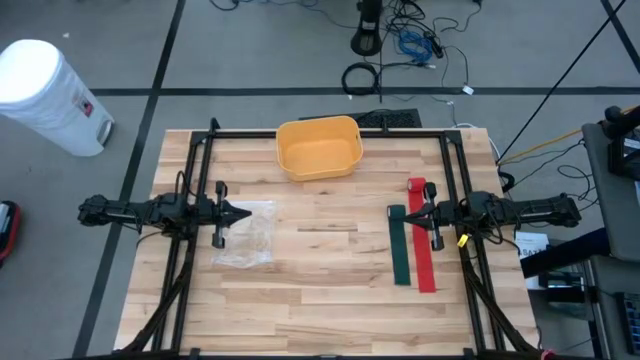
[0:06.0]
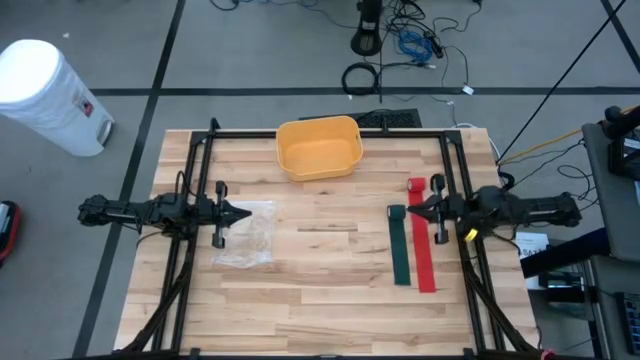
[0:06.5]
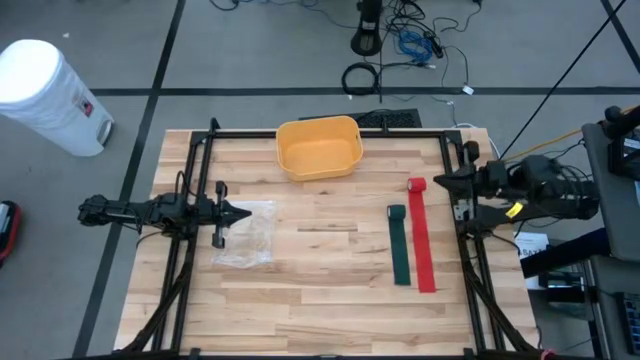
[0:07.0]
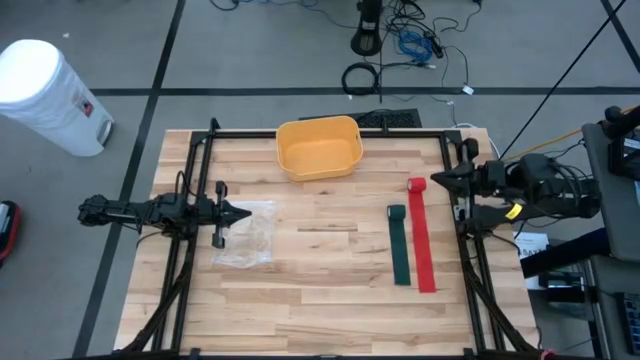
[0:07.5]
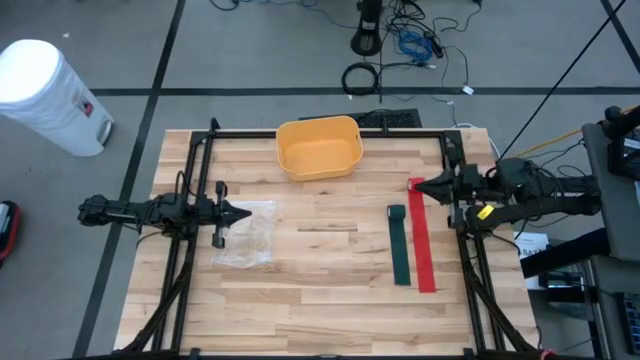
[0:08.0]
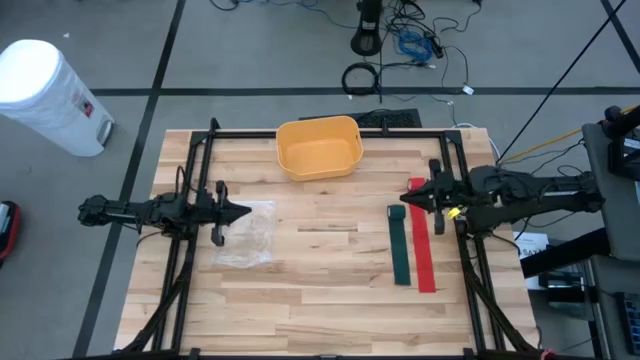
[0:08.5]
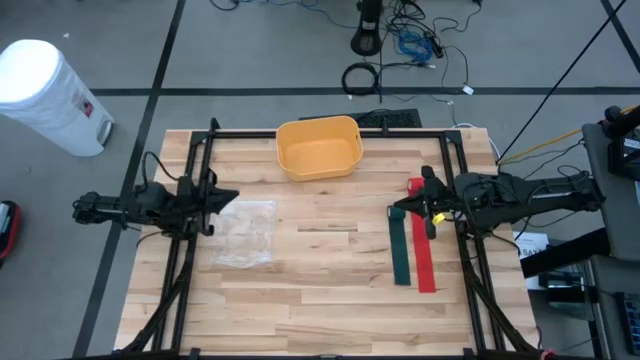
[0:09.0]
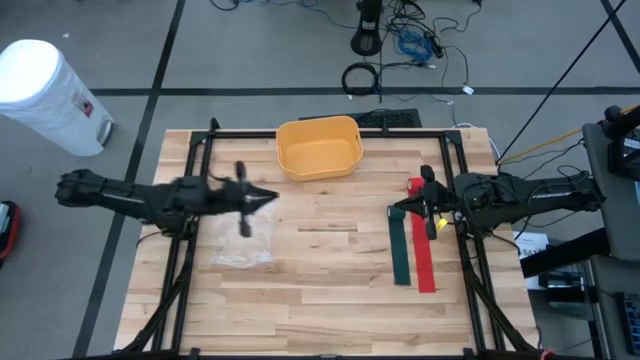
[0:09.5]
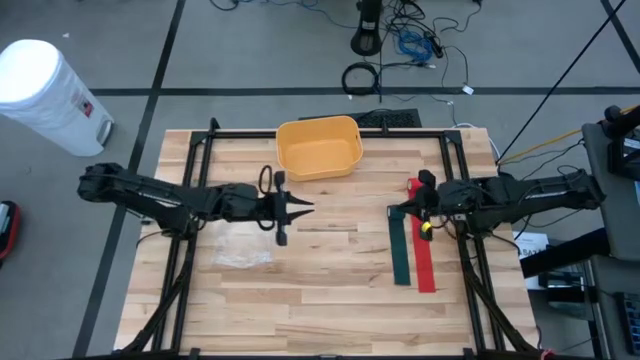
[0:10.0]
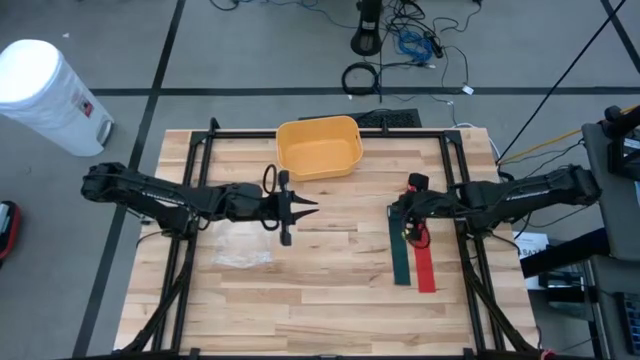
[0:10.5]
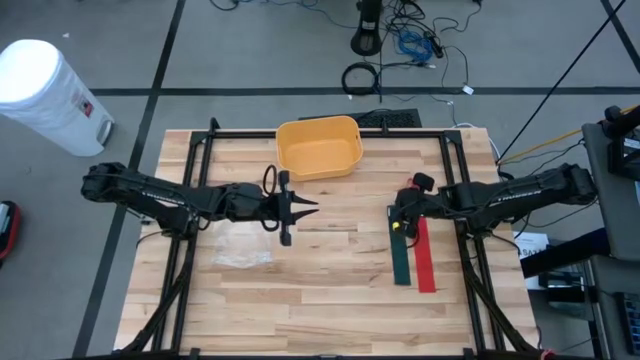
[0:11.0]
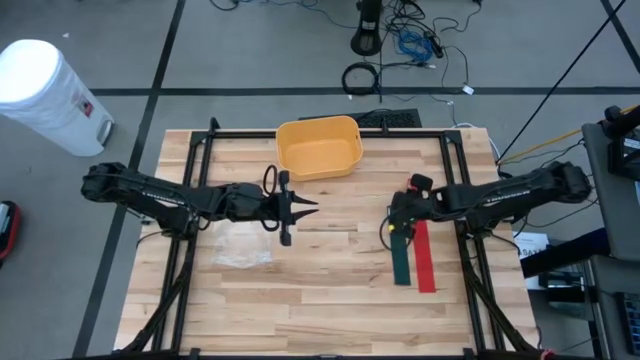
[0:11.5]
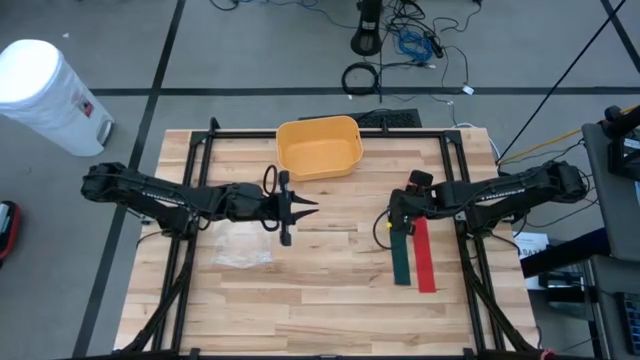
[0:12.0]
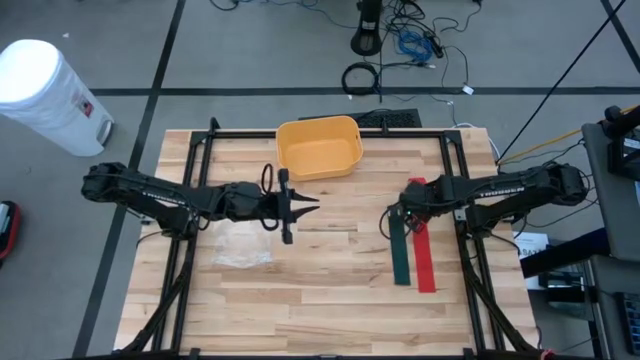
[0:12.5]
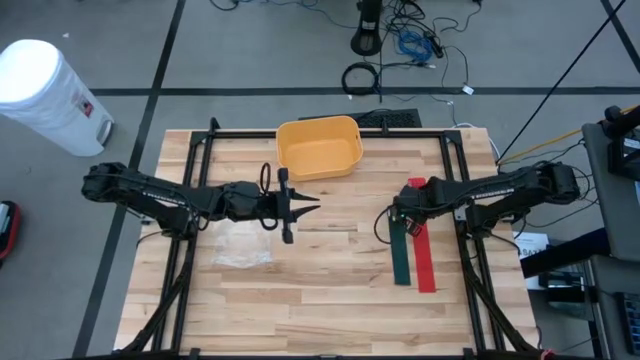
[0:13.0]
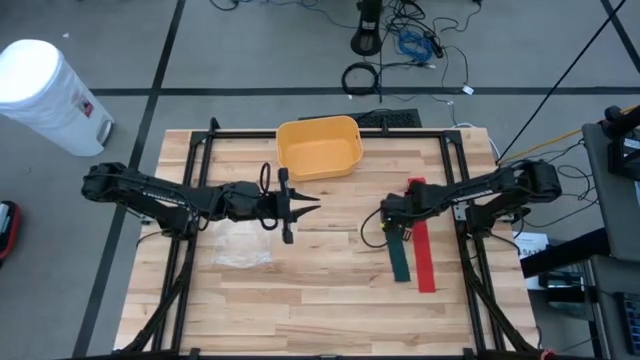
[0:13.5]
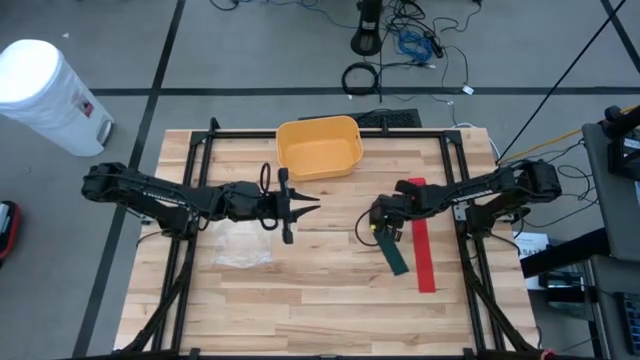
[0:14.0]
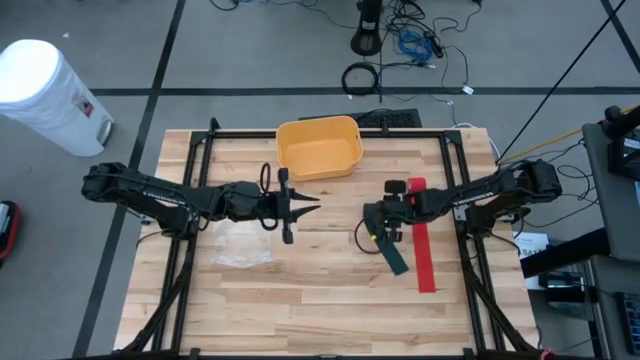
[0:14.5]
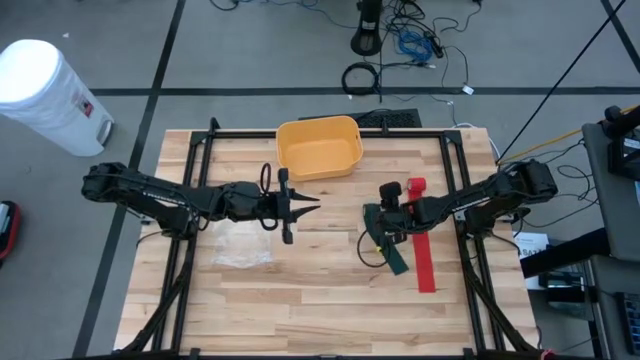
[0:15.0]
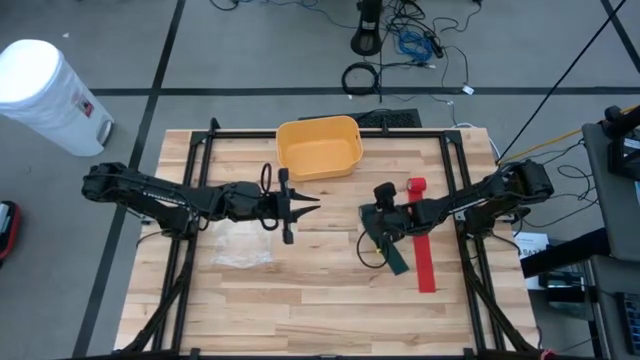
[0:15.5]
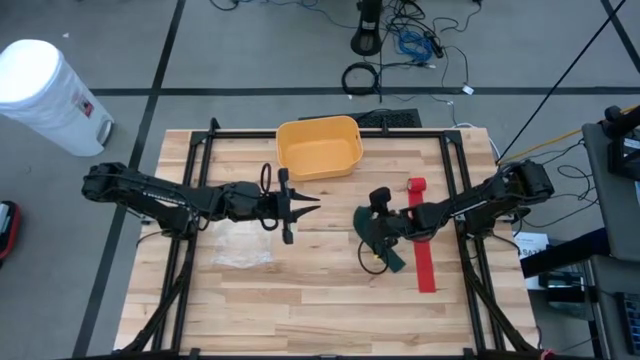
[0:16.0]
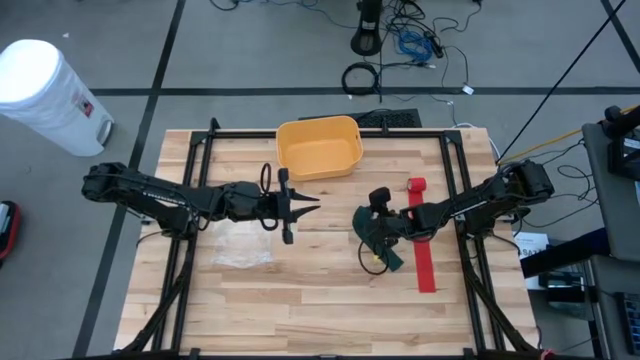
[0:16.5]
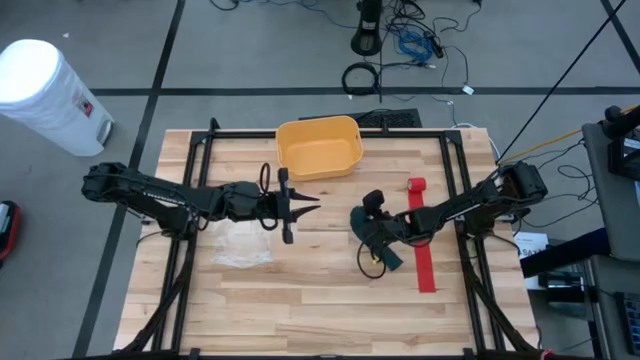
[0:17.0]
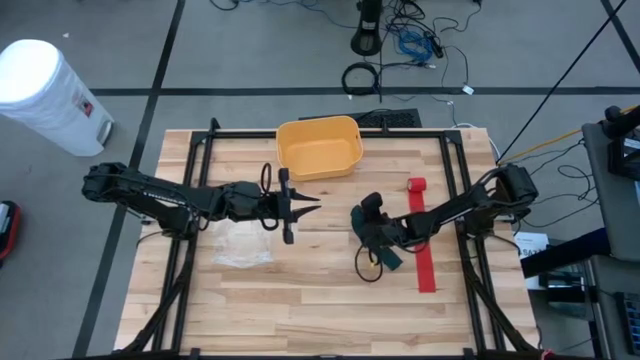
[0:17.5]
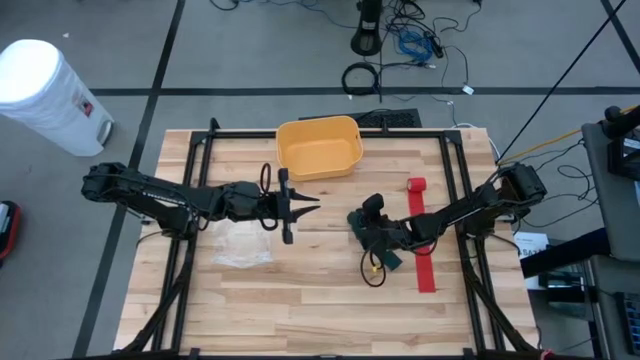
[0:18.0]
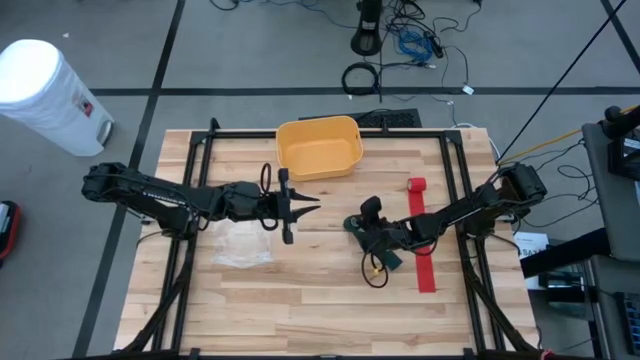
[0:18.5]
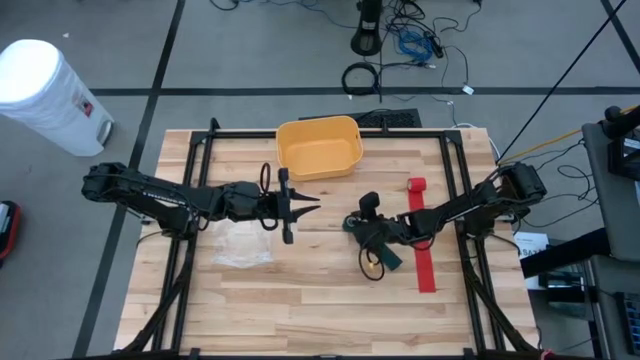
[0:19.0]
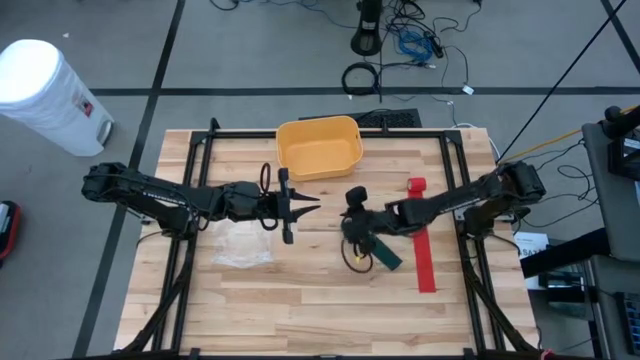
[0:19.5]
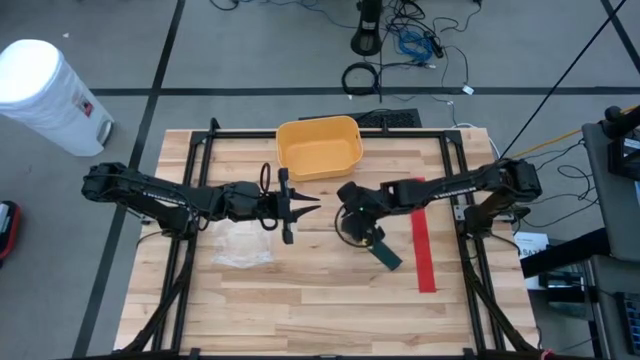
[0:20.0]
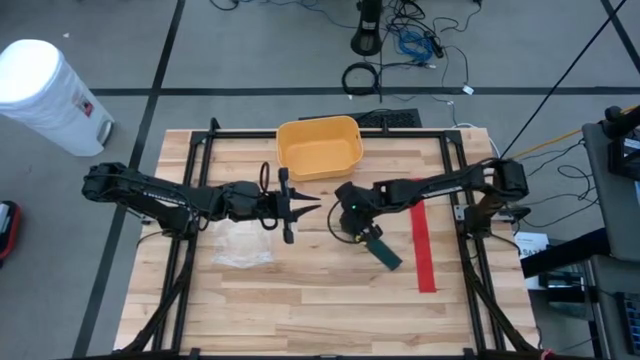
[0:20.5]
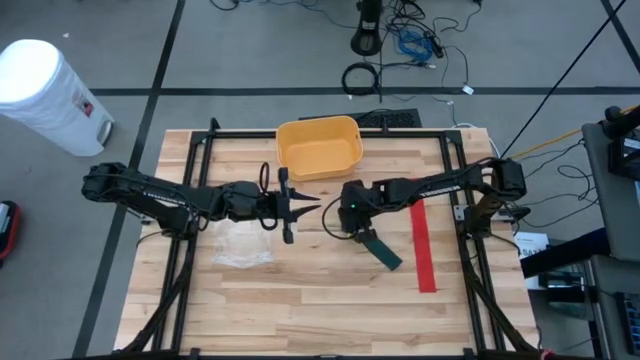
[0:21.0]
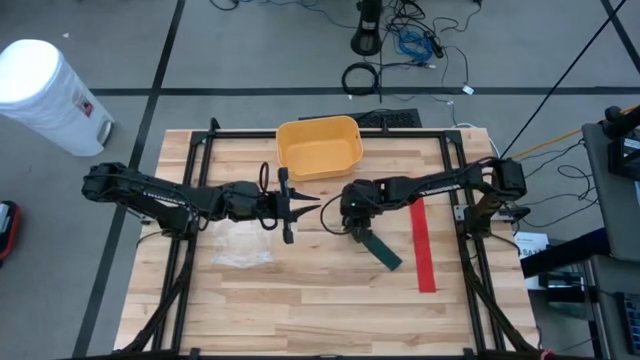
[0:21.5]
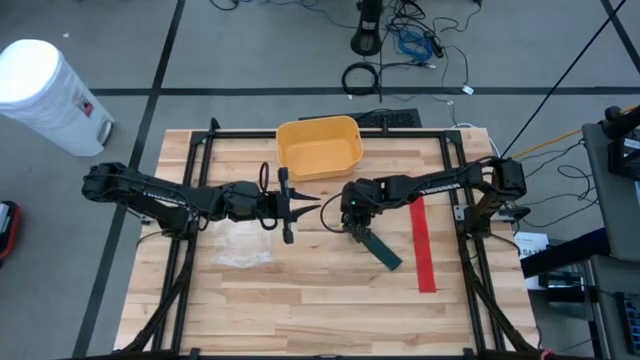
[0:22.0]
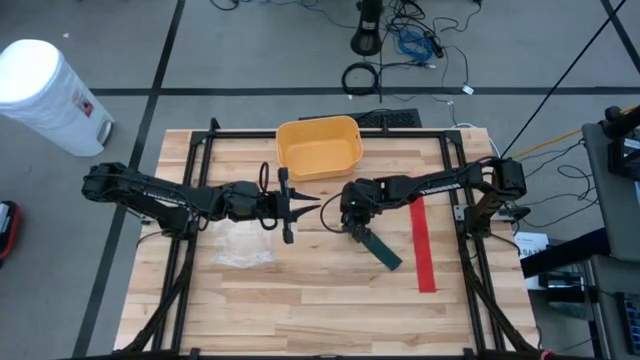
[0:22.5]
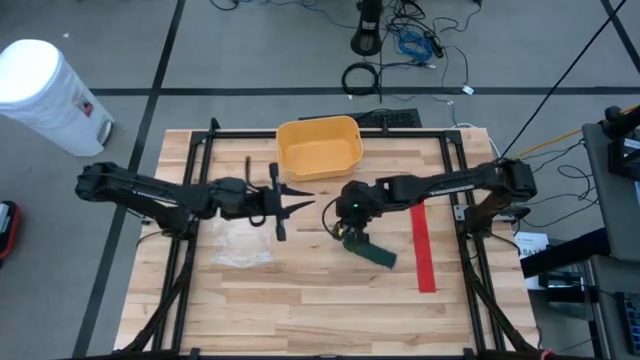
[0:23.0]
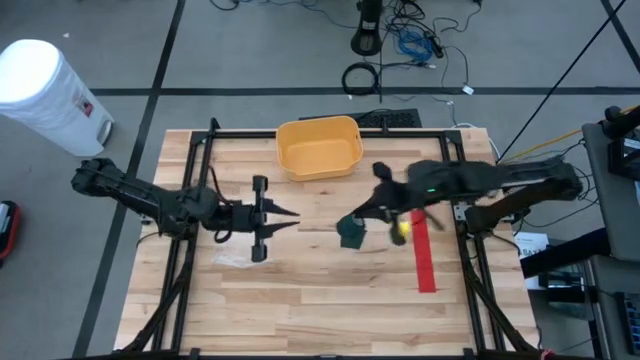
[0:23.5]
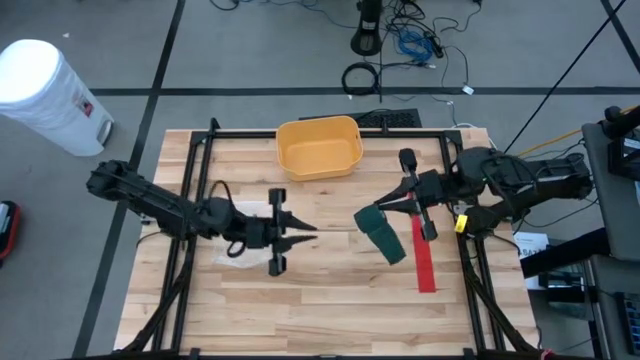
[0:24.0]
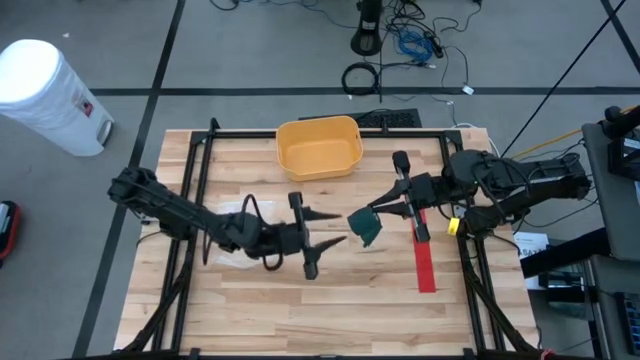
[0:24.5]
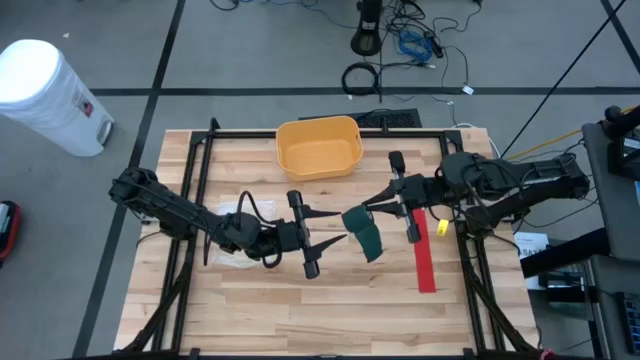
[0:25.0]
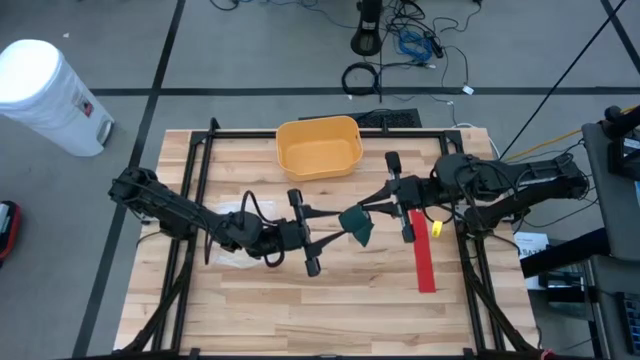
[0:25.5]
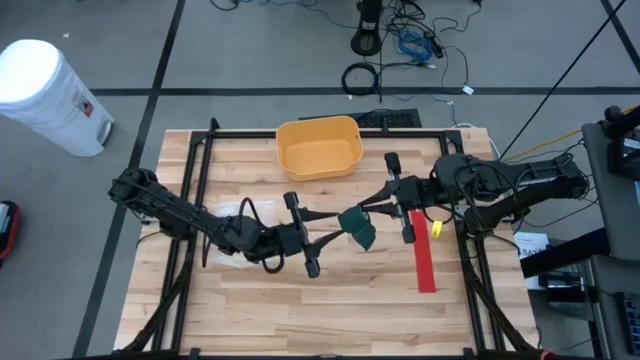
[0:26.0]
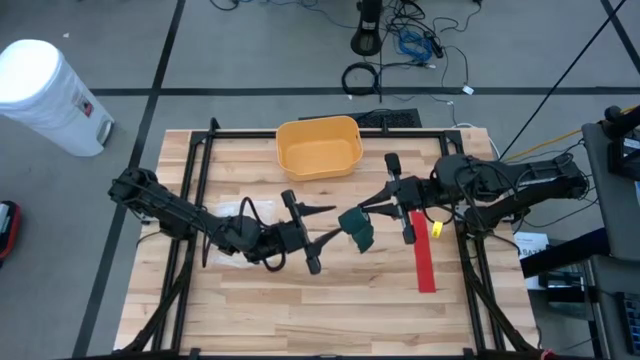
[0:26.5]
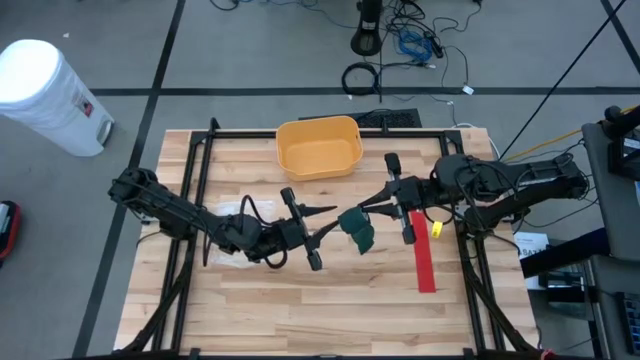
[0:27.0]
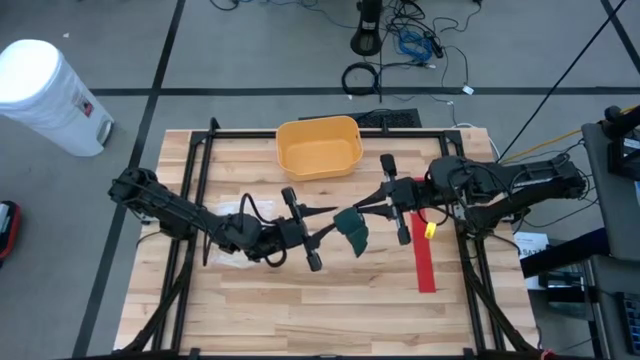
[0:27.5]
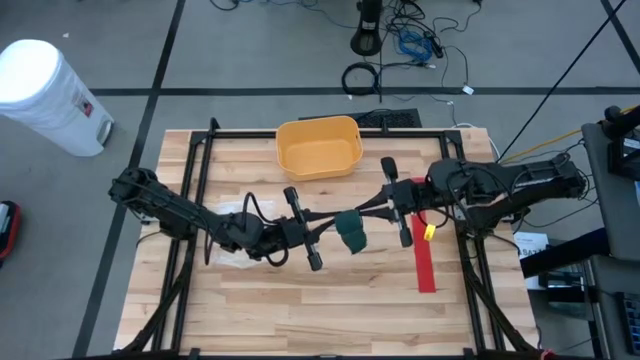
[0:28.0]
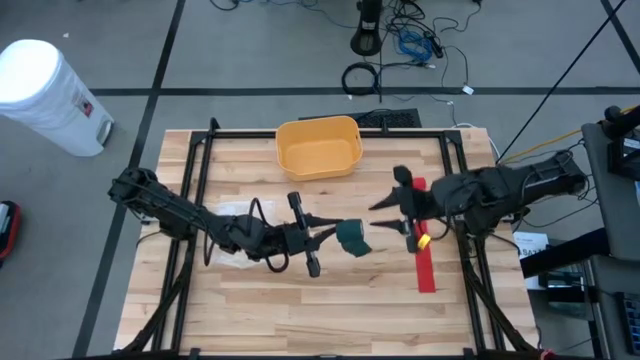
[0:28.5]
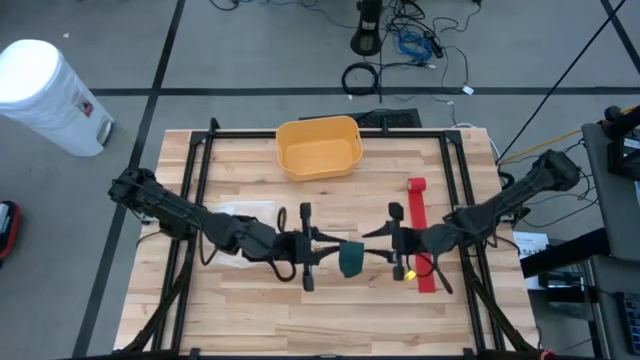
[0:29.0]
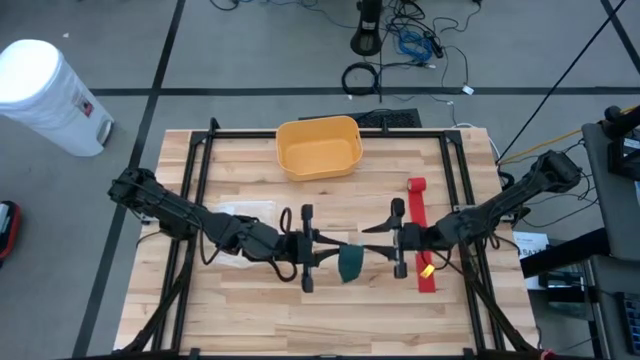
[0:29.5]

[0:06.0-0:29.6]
Task: Roll bandage
Roll the green bandage
